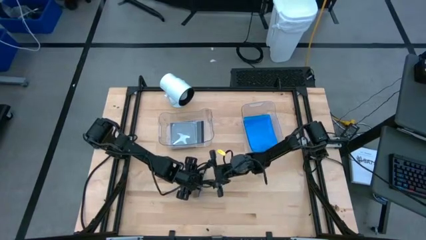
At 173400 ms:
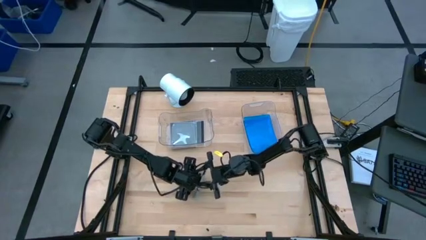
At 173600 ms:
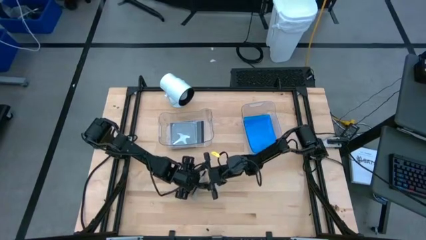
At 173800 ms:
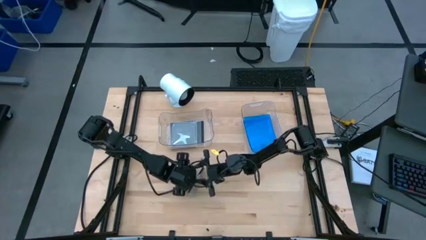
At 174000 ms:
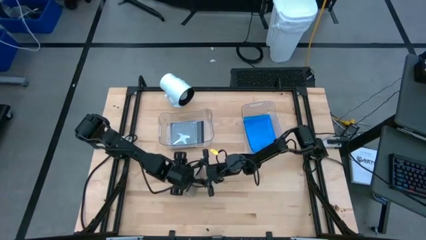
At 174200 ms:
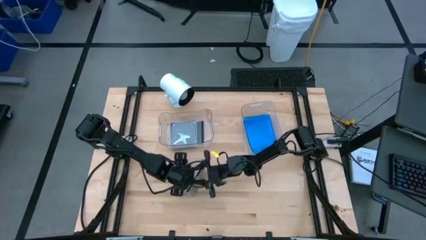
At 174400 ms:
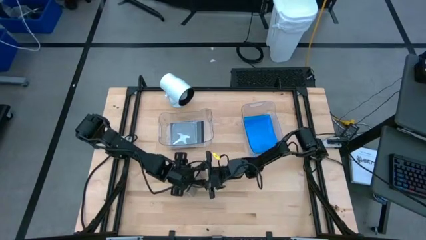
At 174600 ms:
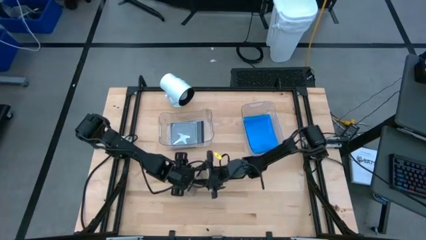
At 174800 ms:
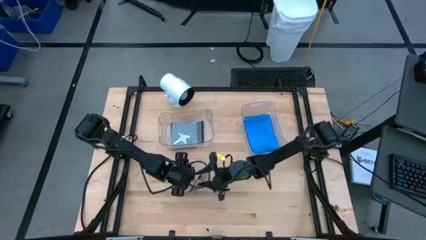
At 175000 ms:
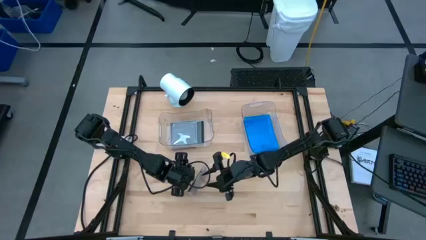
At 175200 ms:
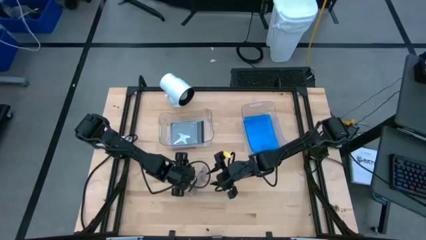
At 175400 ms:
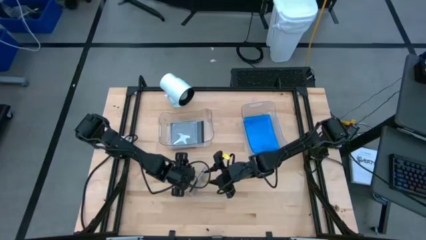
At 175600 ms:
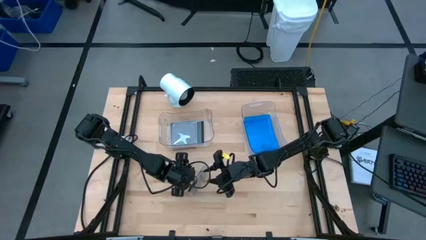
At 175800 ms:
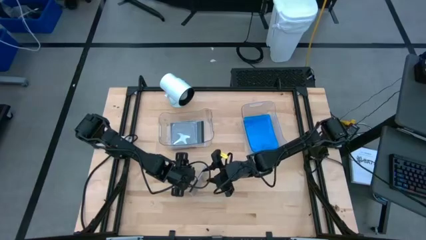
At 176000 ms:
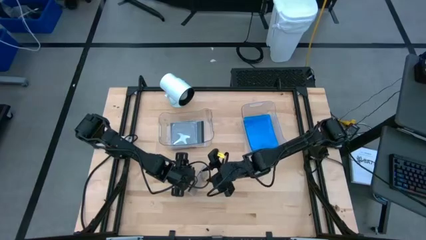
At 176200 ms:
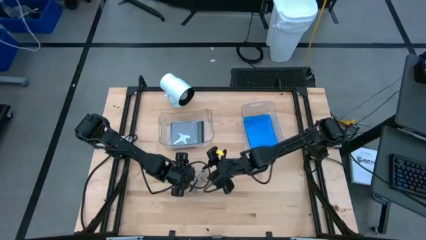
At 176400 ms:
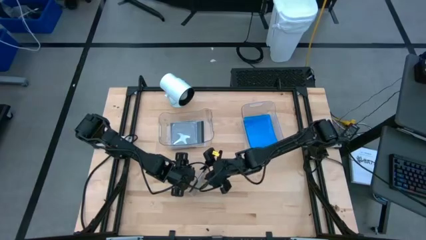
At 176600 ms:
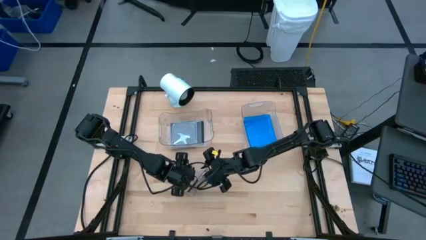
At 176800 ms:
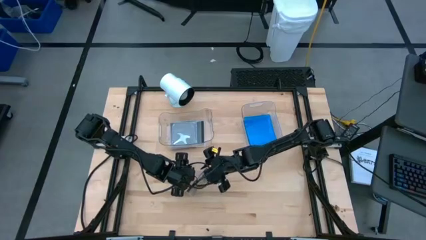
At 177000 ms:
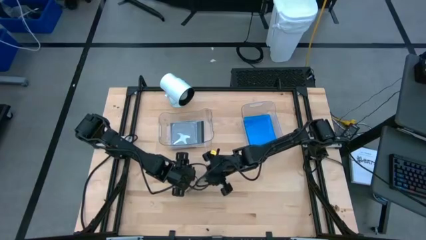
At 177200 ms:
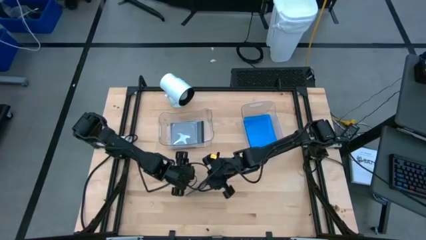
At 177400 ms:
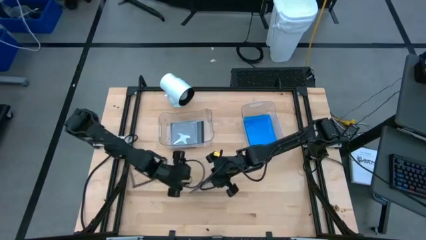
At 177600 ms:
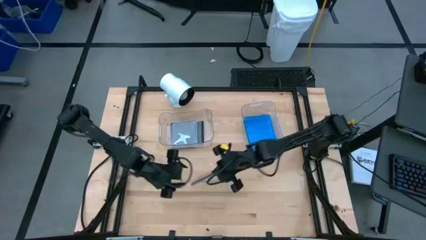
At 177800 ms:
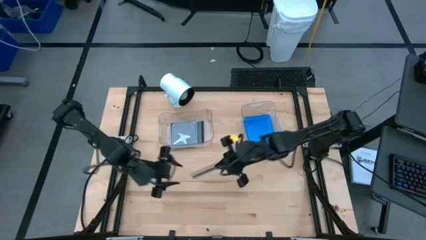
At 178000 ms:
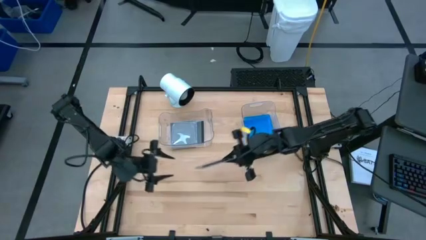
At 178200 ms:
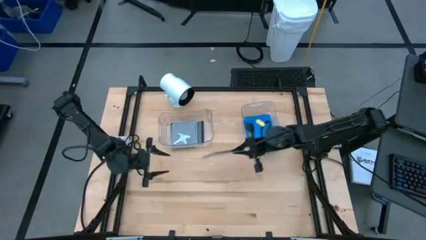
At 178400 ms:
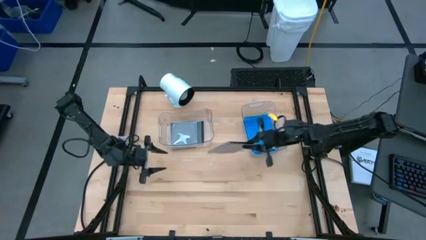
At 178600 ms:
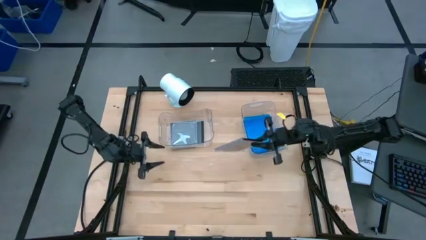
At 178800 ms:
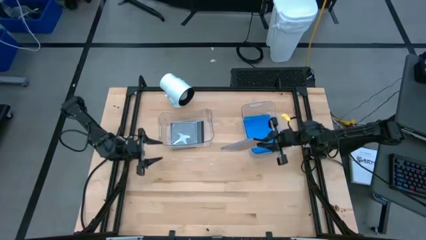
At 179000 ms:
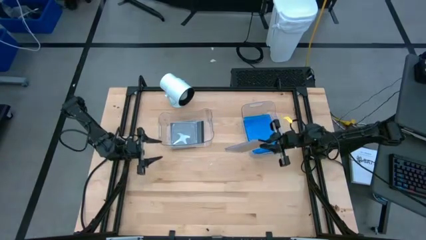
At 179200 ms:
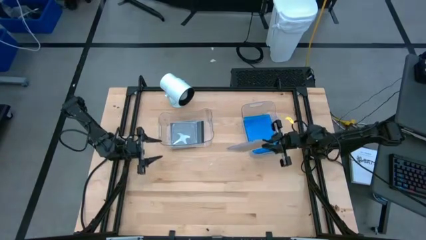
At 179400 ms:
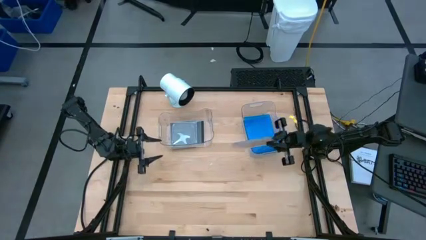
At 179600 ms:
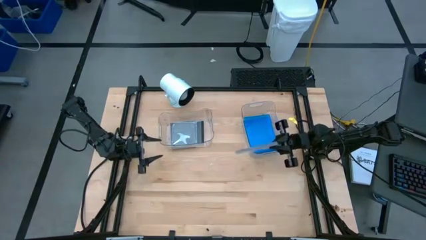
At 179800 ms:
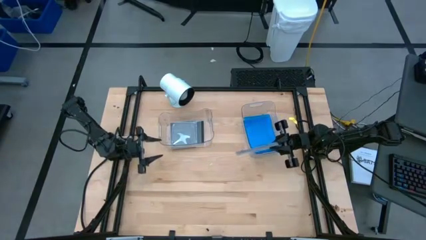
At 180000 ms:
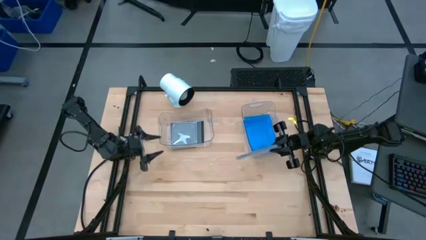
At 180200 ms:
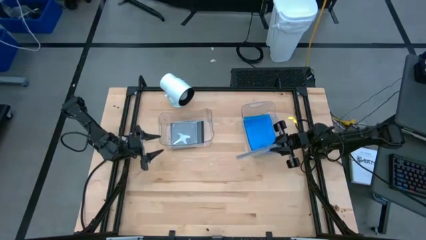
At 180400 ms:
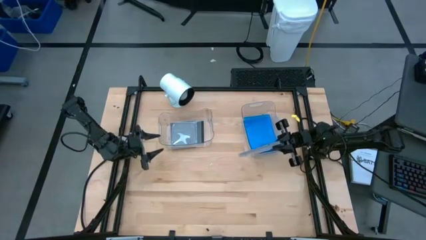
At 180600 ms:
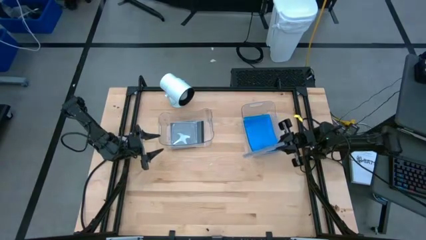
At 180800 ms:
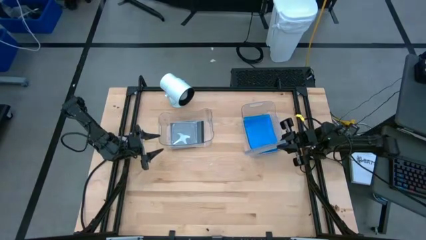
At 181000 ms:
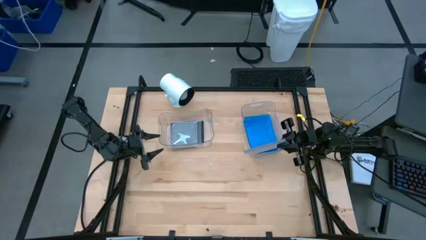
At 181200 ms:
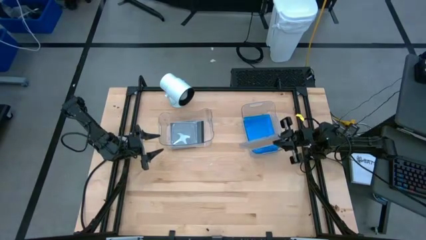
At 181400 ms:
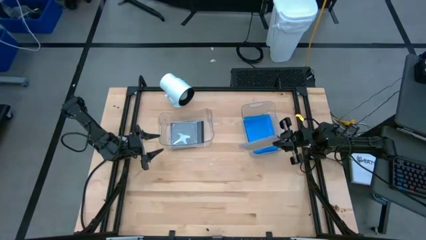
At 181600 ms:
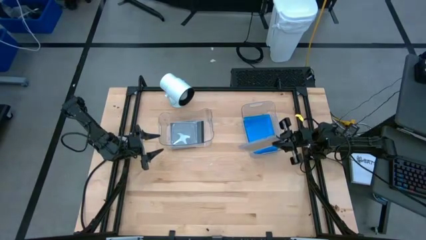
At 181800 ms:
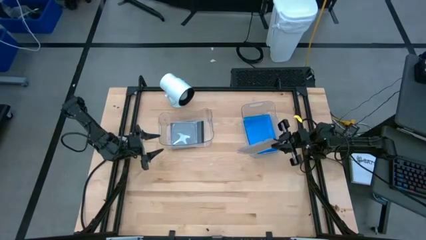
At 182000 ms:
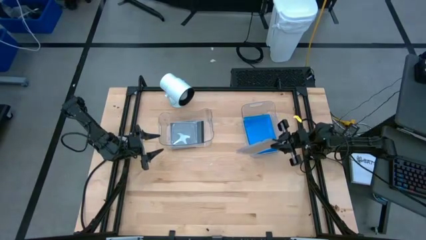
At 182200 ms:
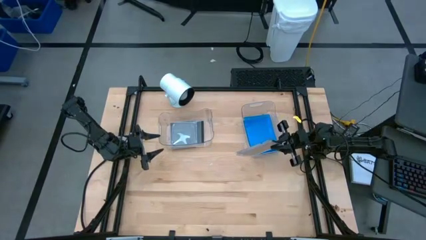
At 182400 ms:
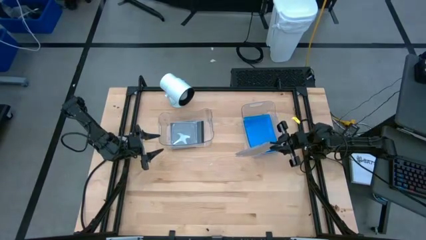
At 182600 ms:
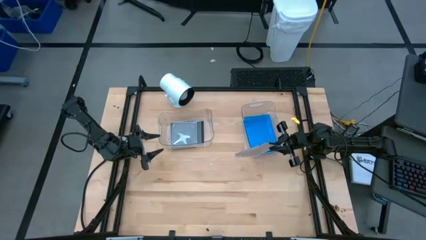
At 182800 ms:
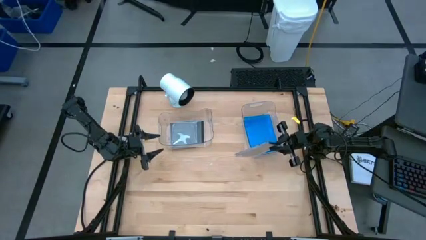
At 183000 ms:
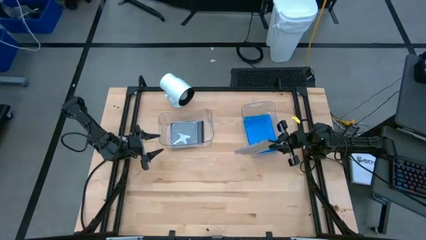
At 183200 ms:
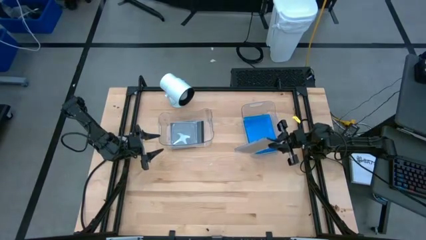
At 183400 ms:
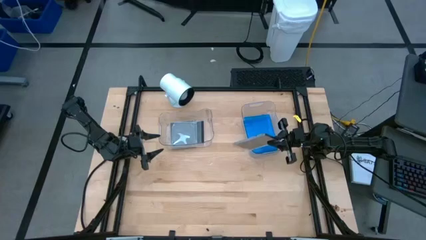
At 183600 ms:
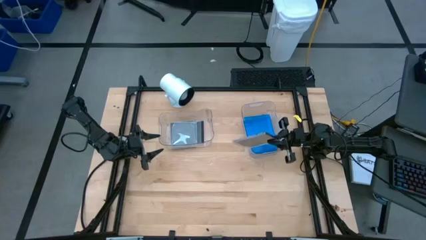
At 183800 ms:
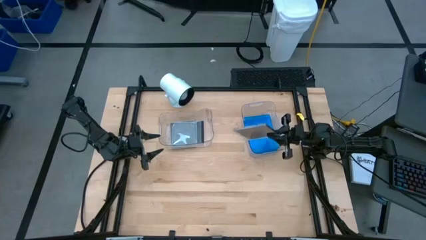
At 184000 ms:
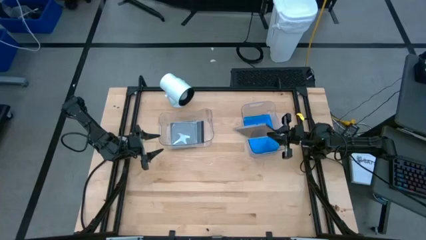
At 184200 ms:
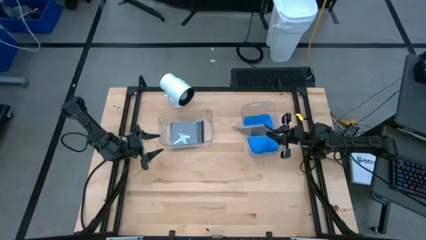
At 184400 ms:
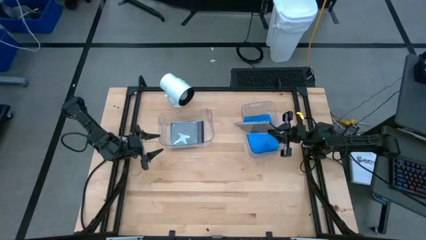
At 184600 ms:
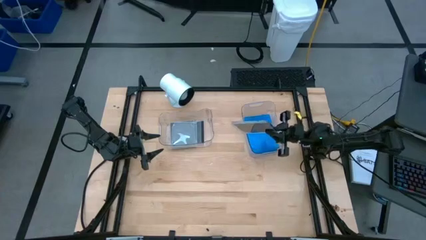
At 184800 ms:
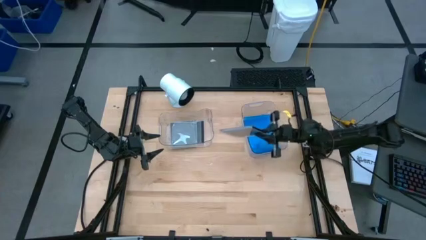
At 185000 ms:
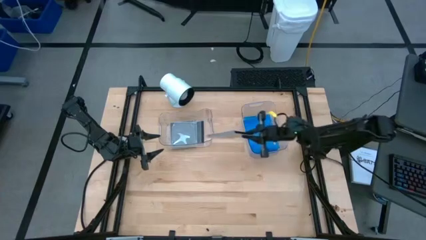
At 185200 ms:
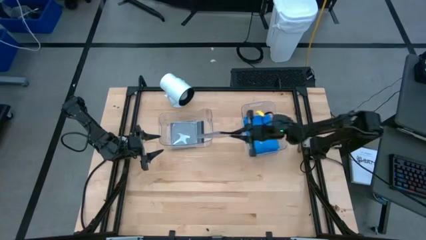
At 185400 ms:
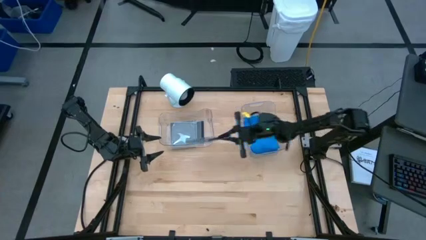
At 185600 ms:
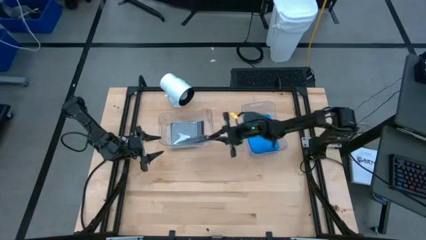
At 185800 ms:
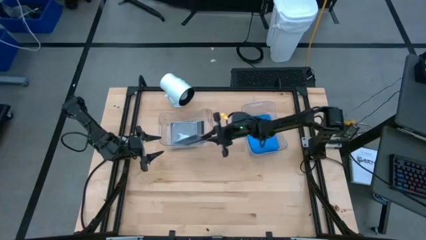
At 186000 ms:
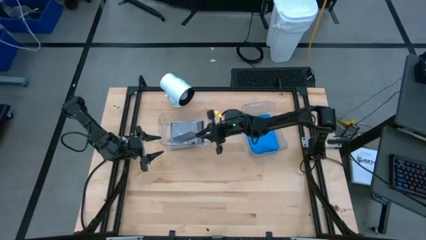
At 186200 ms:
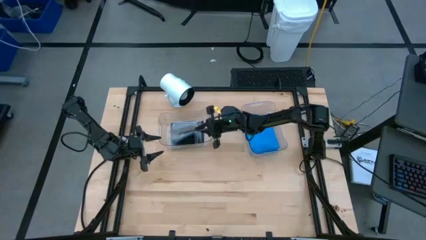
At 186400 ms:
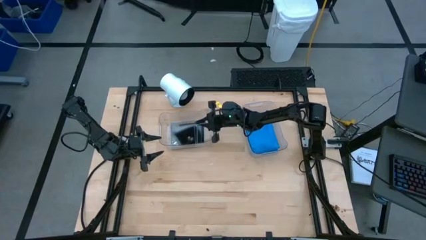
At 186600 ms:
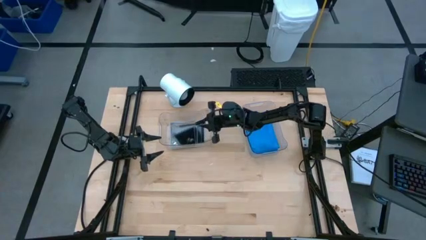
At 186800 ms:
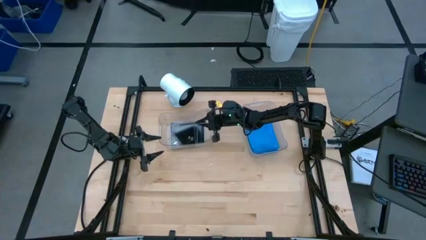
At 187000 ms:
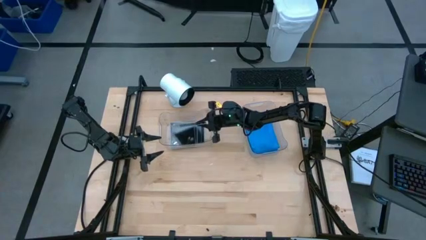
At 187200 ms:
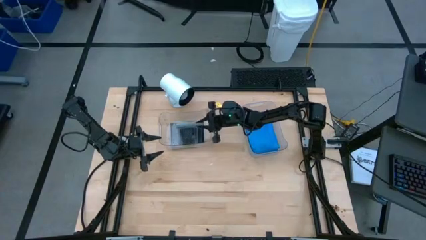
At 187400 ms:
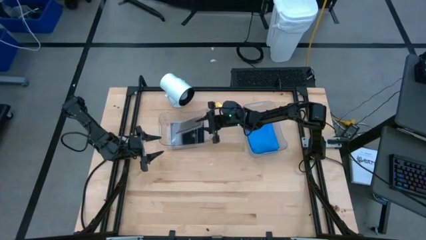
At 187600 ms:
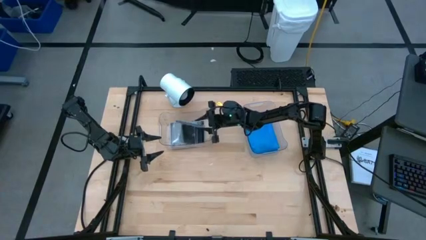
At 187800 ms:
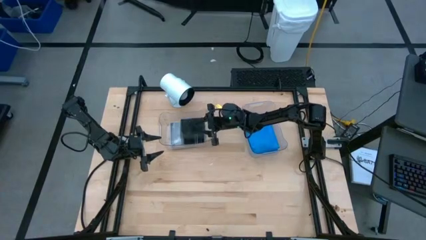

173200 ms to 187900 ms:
Task: Pick & place jewel cases by type
Put the black cd case into the left transparent bin
